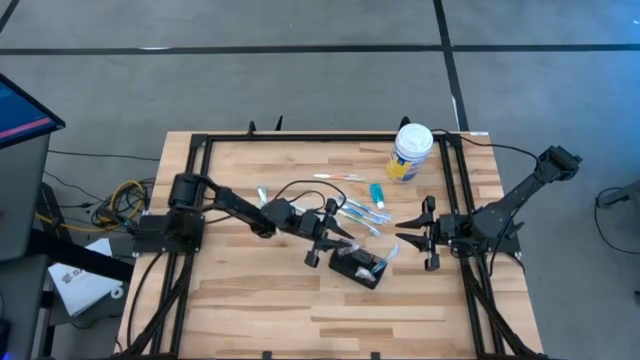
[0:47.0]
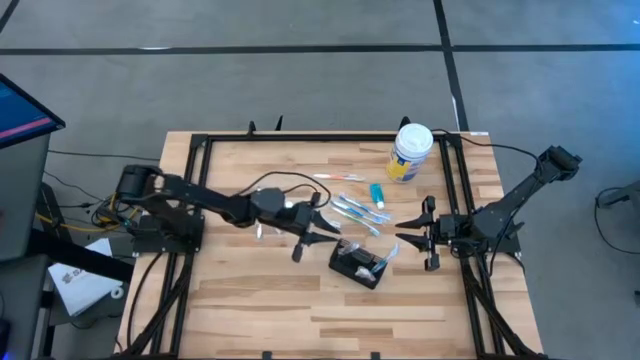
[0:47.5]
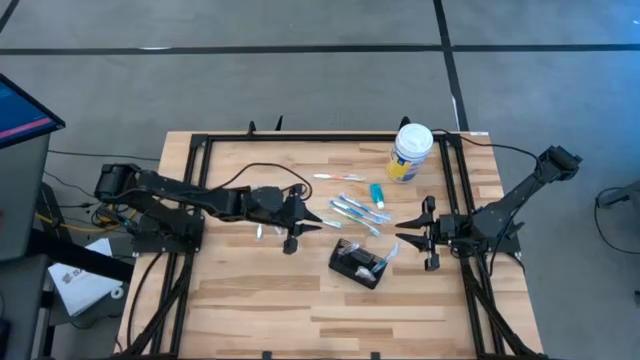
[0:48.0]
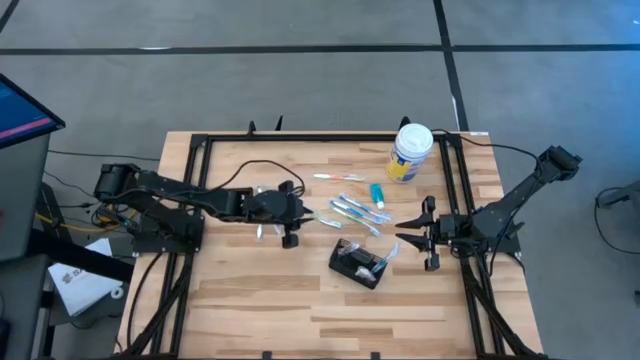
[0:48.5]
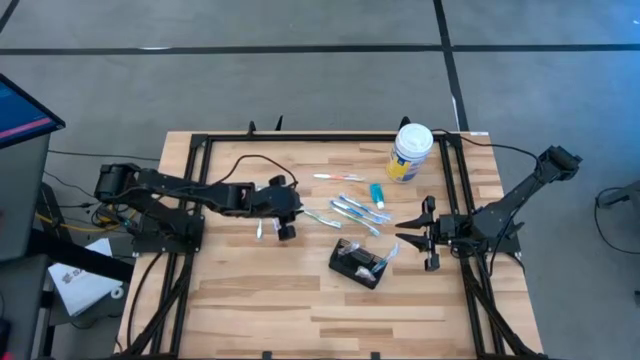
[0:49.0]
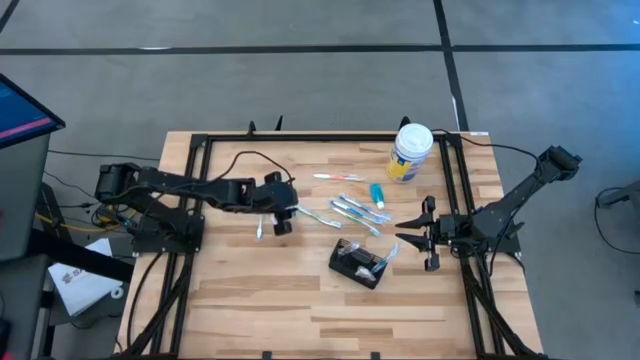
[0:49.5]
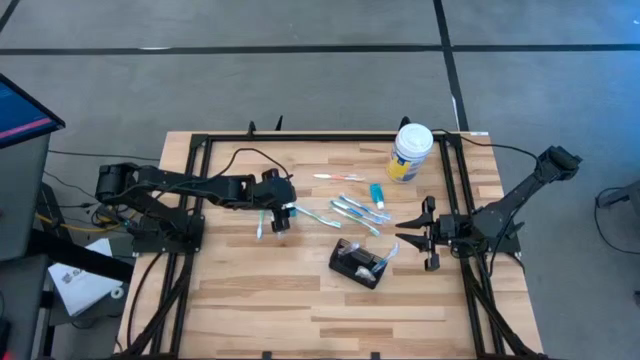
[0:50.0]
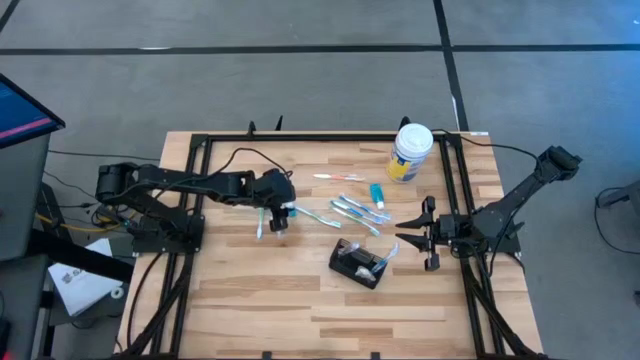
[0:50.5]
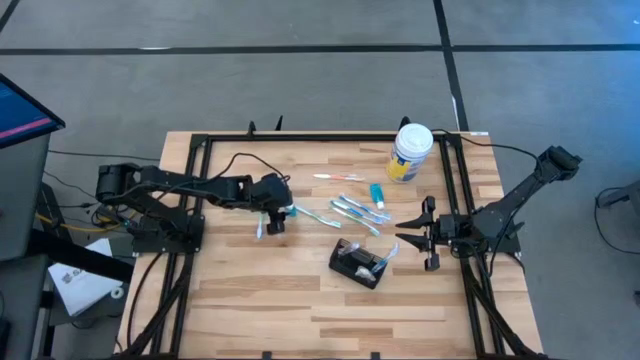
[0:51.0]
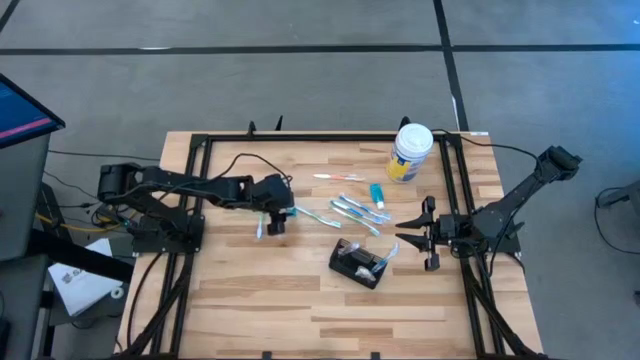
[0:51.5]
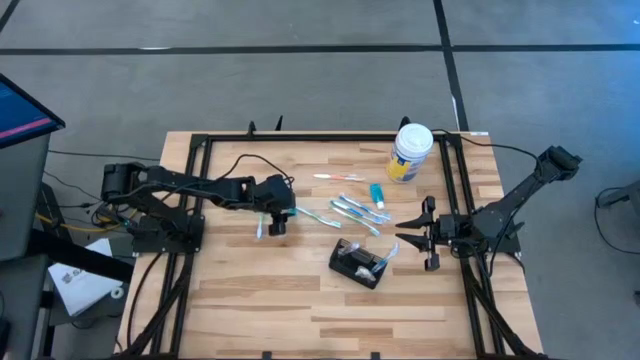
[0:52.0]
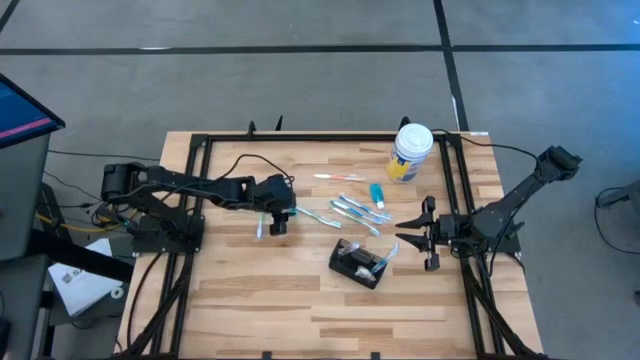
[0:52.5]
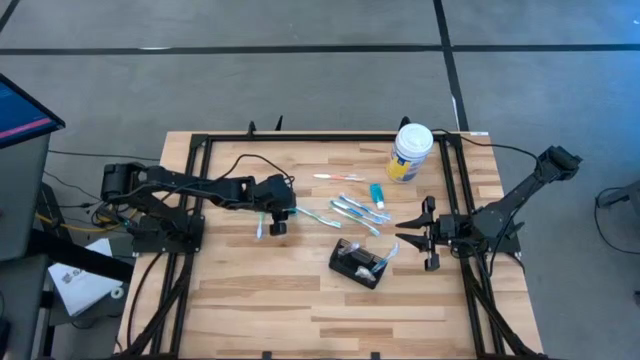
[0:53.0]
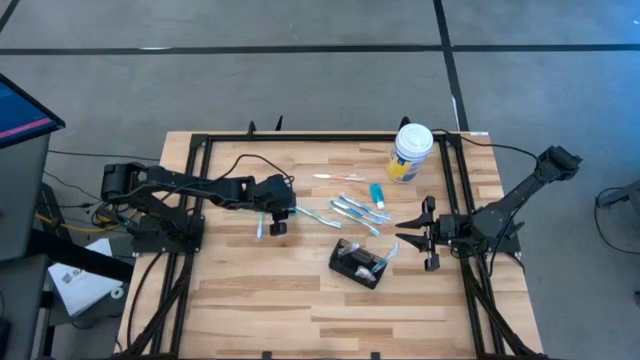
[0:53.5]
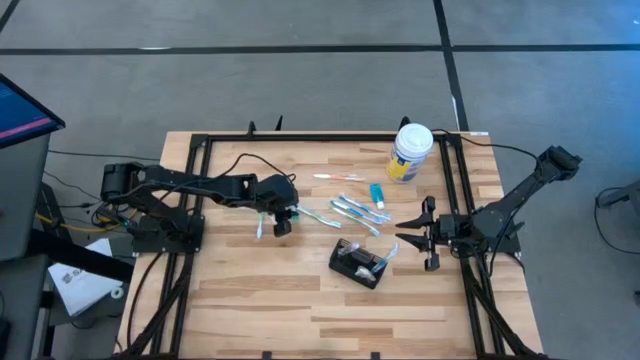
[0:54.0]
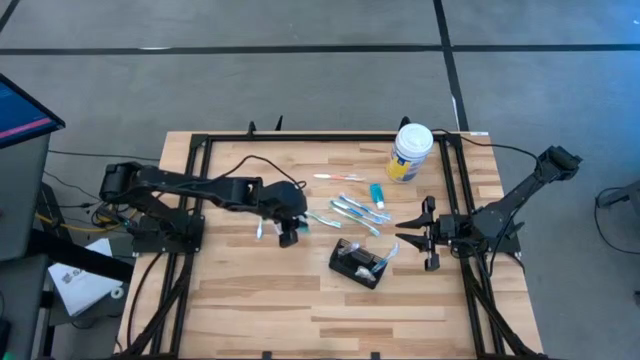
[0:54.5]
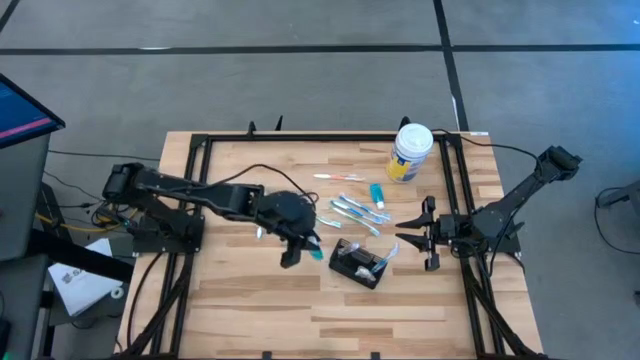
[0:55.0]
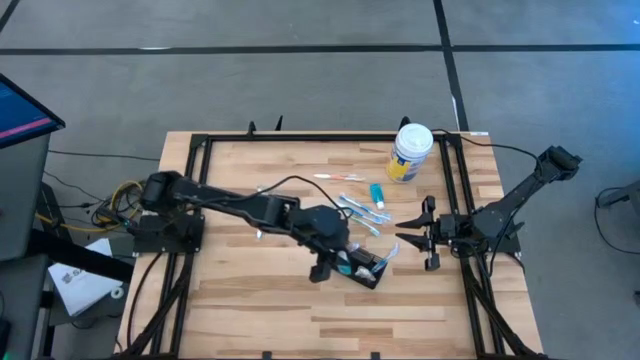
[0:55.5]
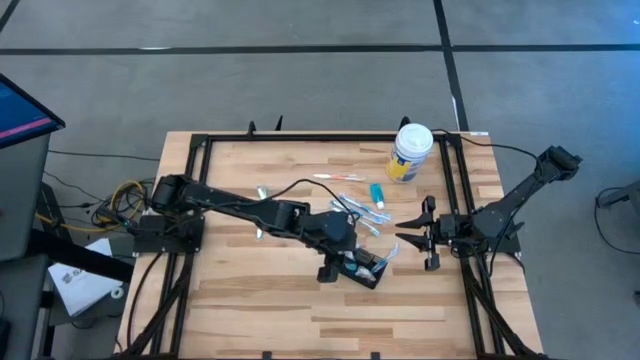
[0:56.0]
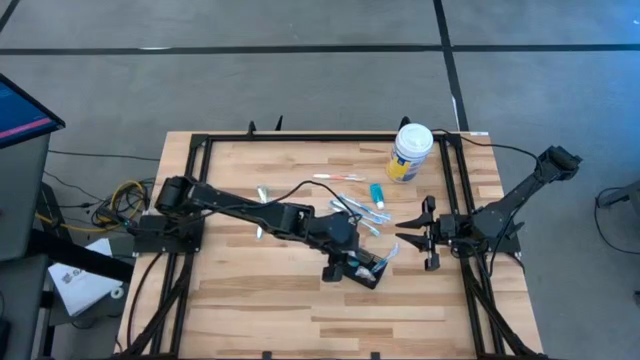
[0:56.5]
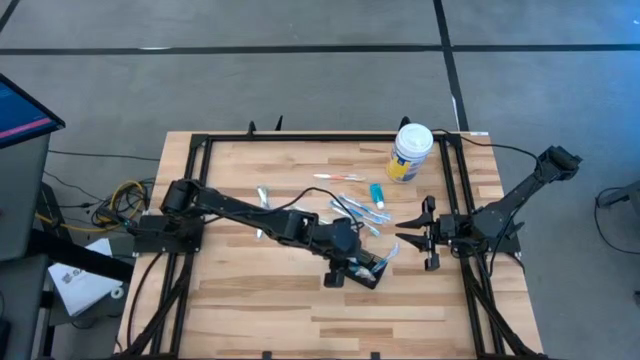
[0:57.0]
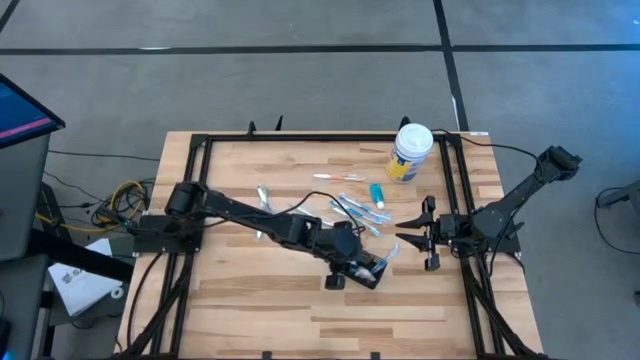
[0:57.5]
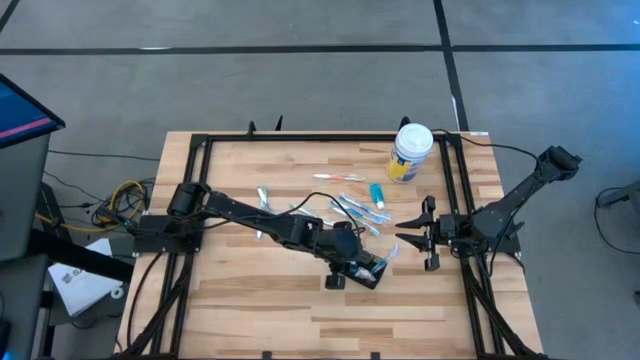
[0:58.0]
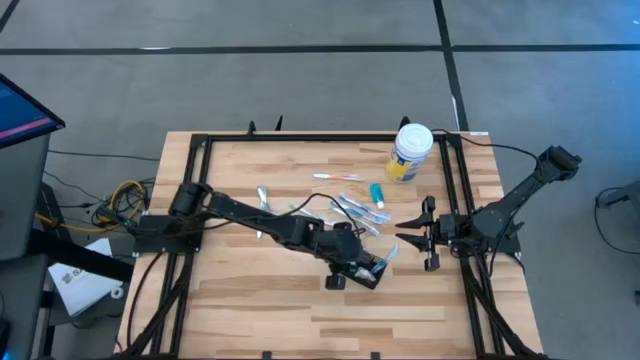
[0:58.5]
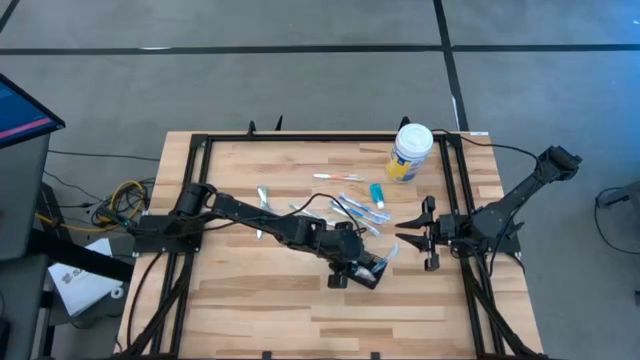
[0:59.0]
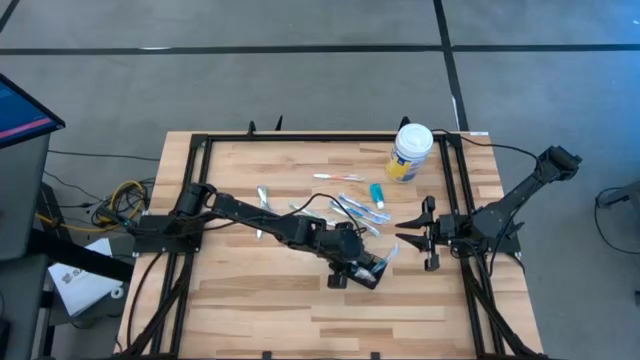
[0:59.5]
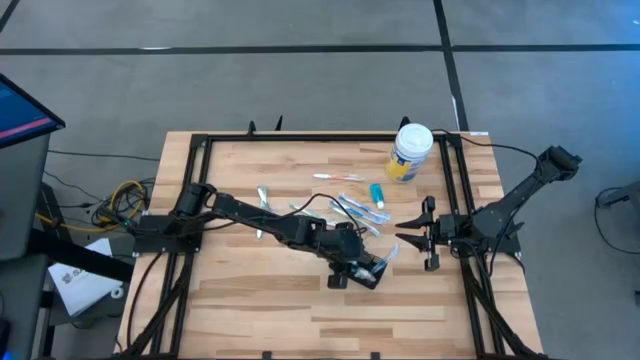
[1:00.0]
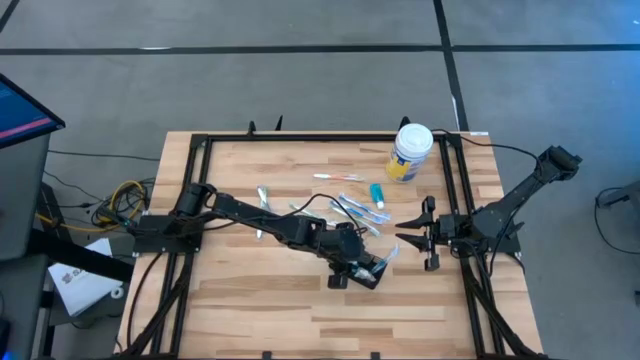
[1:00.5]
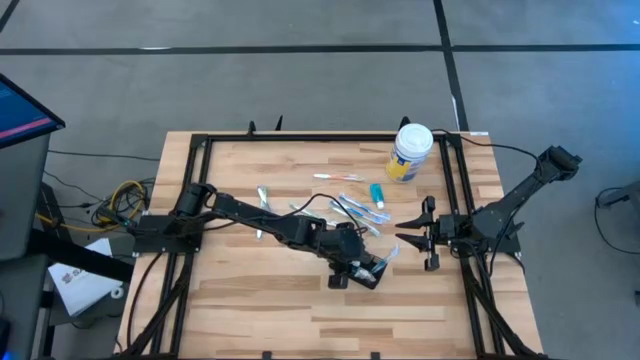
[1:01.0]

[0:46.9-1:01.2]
Task: Pick & Place toothbrushing station
Put the bottom blue mouthwash into the mesh organizer

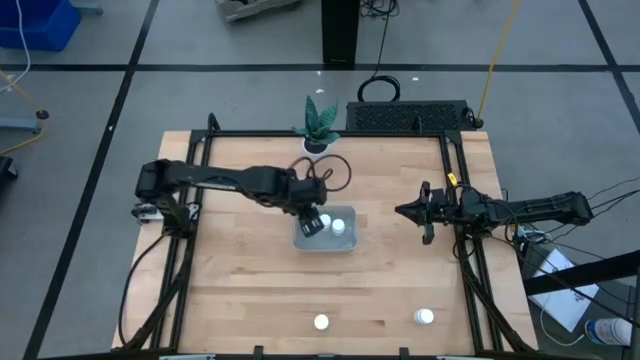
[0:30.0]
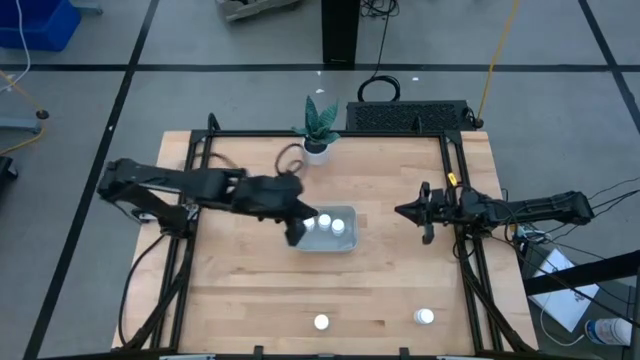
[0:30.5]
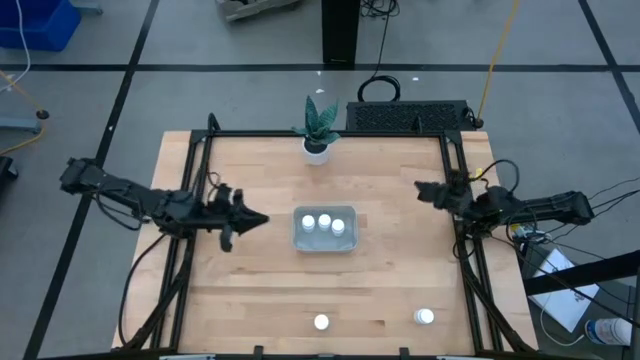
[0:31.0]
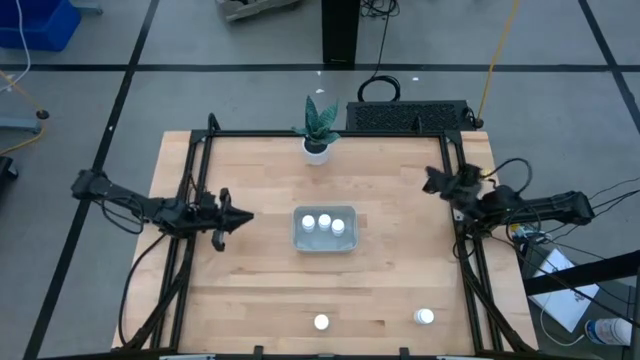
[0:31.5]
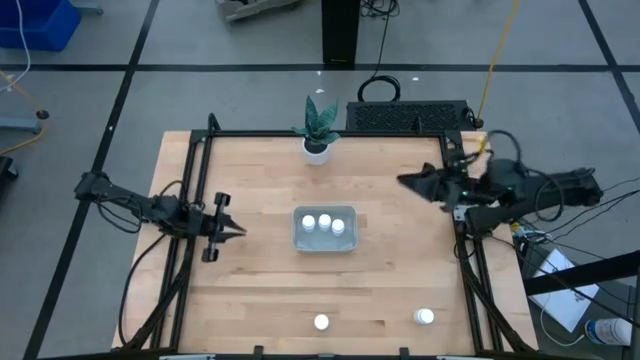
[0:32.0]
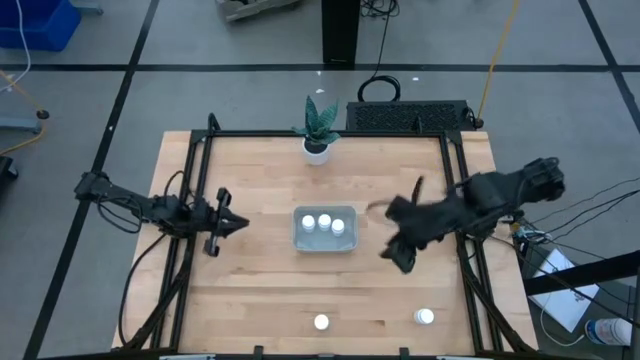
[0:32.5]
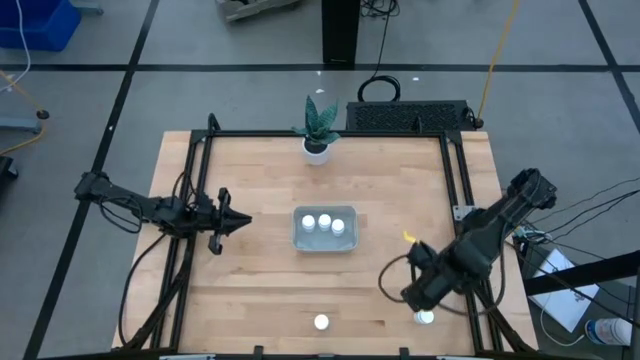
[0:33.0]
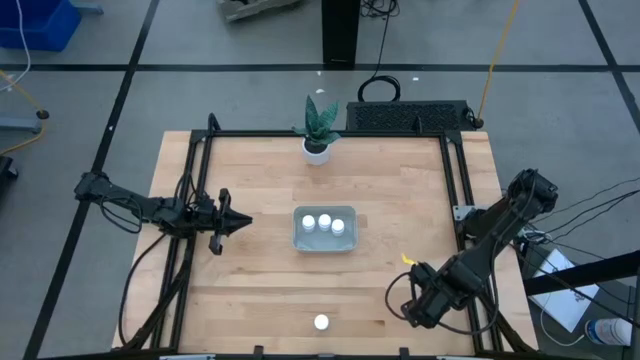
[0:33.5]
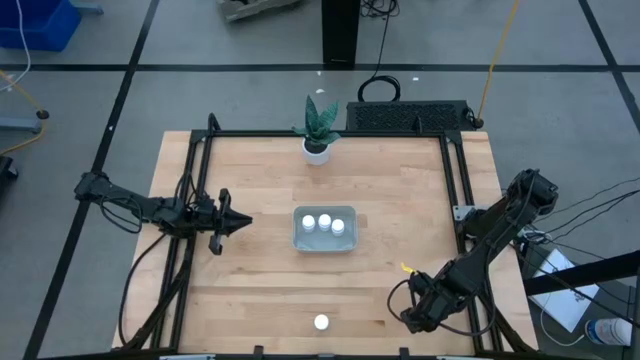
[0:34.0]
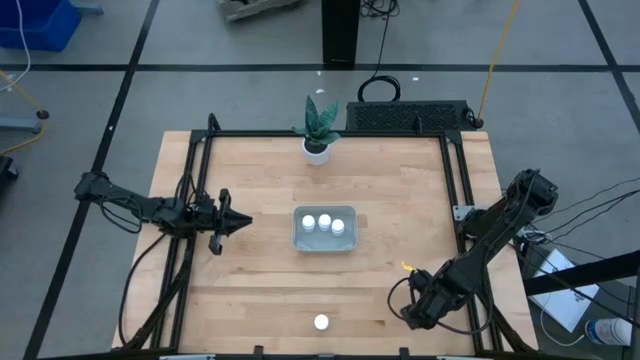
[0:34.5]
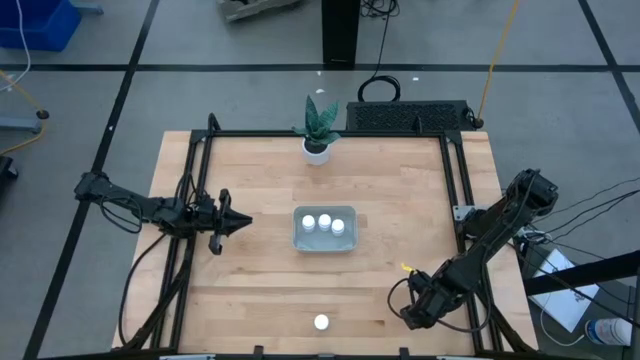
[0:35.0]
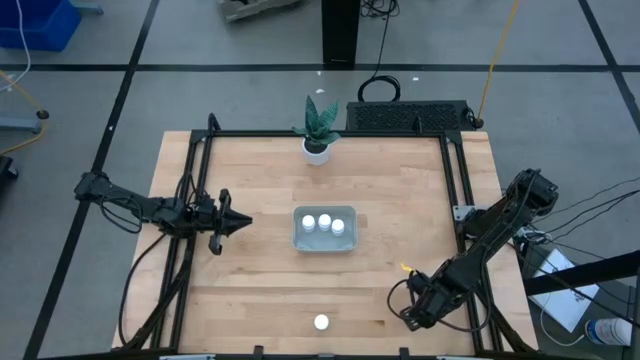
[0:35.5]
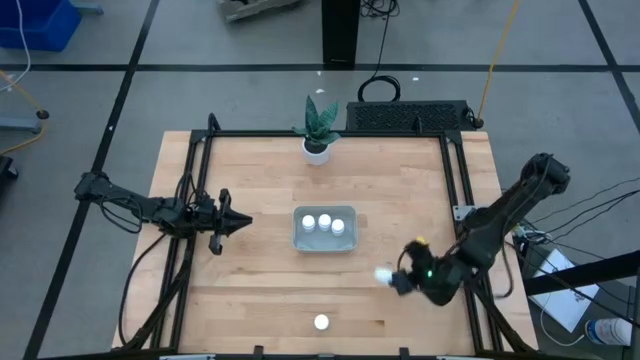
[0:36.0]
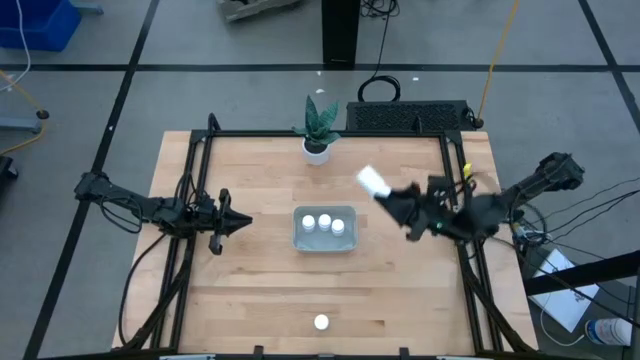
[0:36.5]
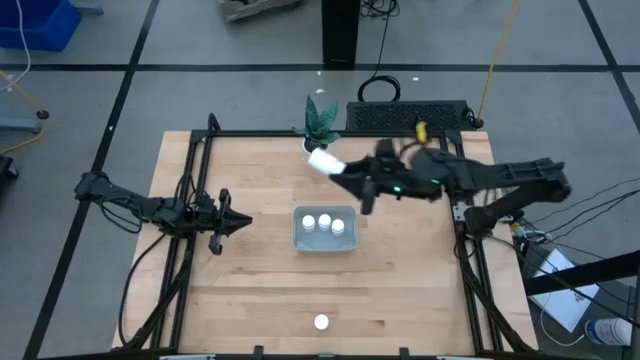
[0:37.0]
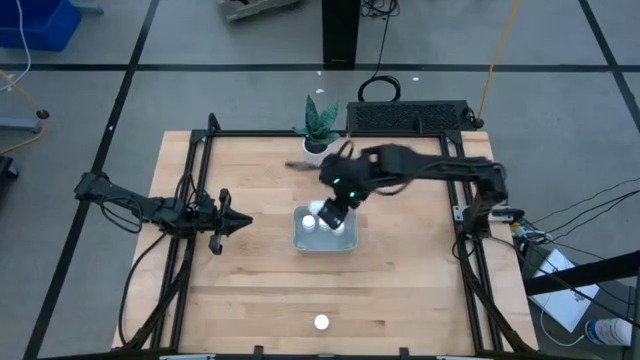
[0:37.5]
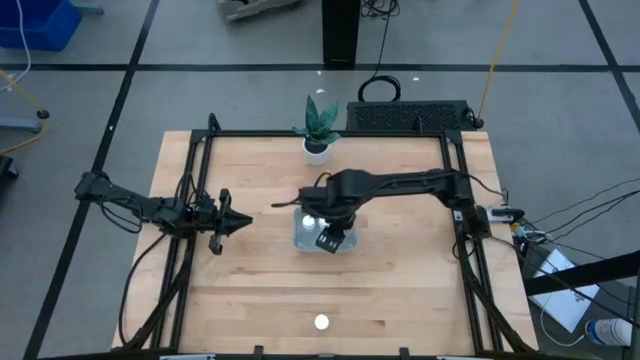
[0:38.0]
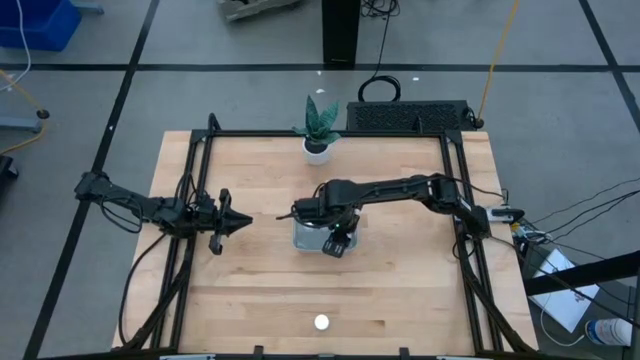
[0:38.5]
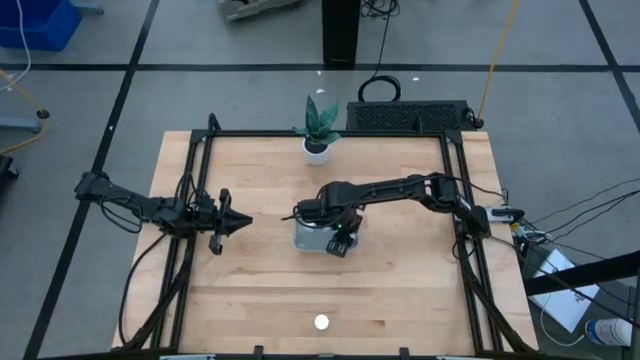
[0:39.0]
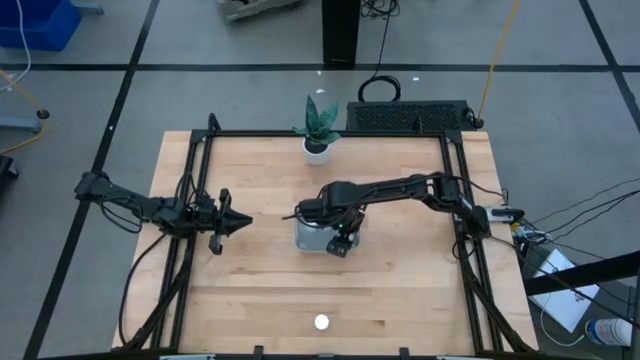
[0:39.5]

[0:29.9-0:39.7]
Task: Pick and place pill bottles into a basket
Put the white pill bottle into the gray bin
